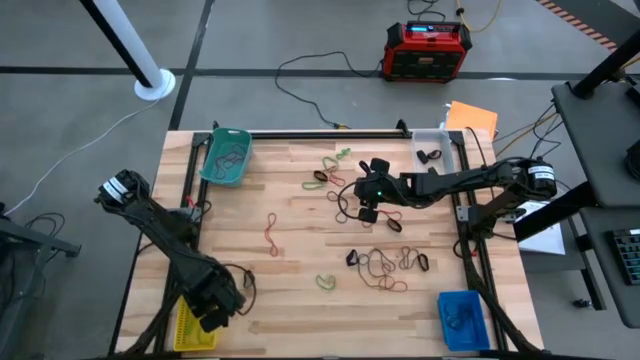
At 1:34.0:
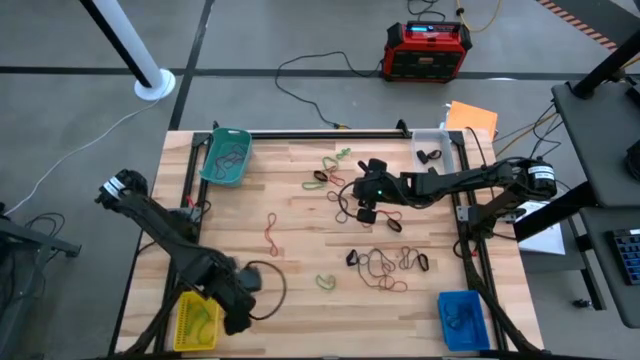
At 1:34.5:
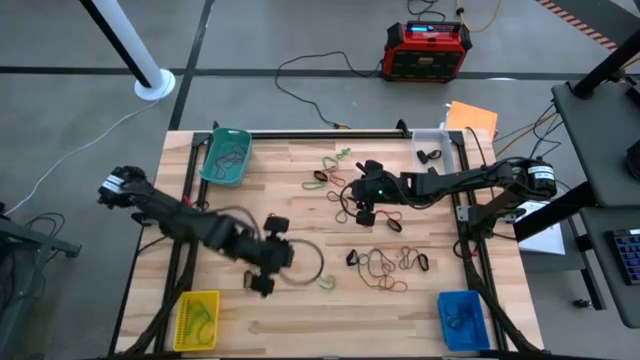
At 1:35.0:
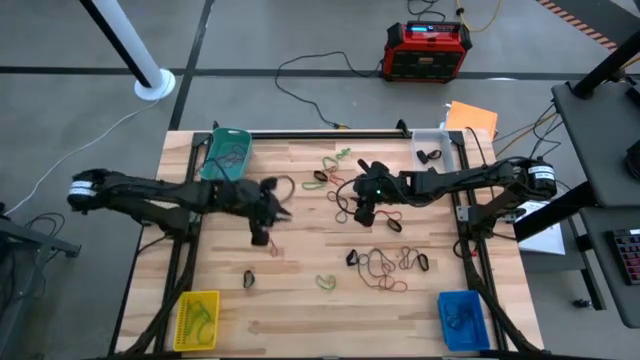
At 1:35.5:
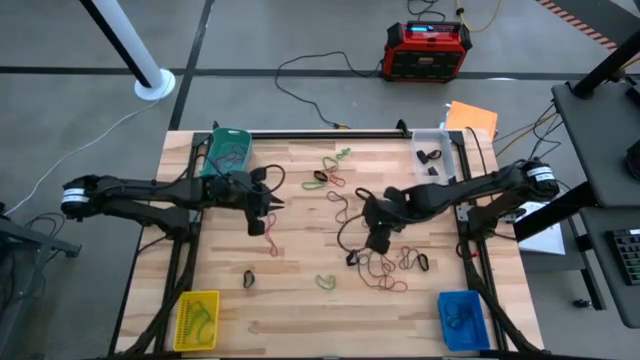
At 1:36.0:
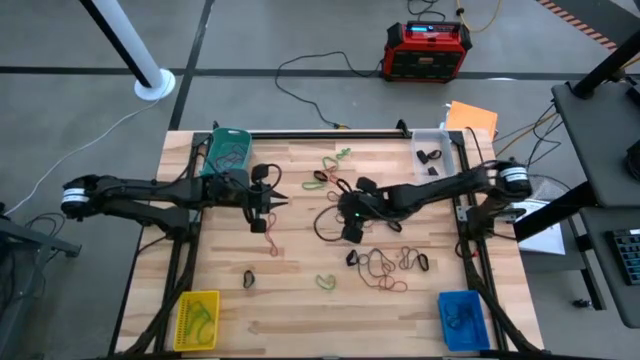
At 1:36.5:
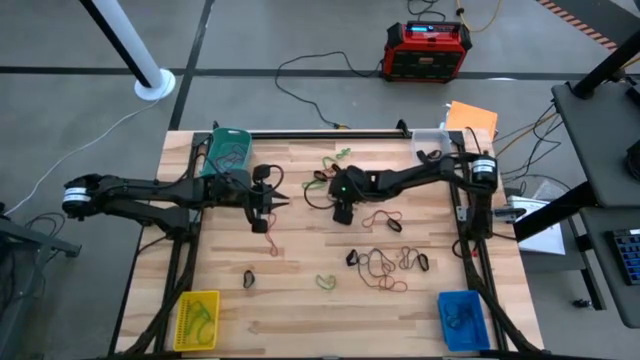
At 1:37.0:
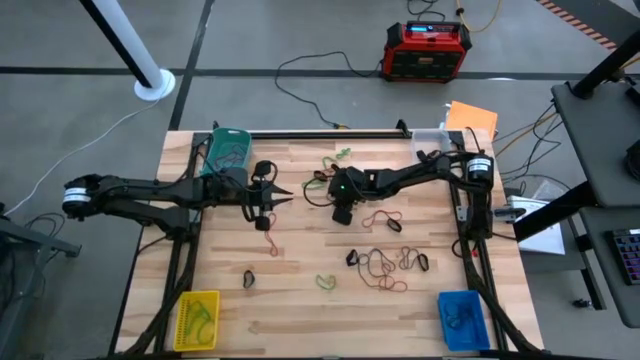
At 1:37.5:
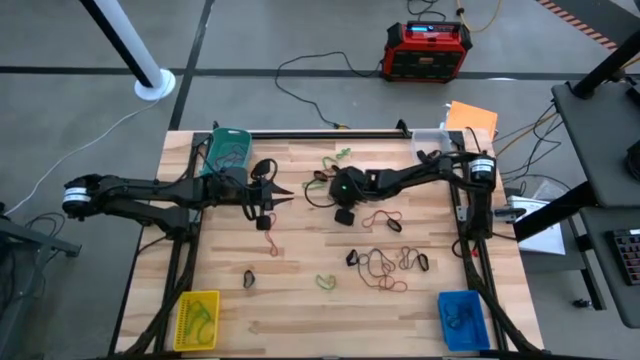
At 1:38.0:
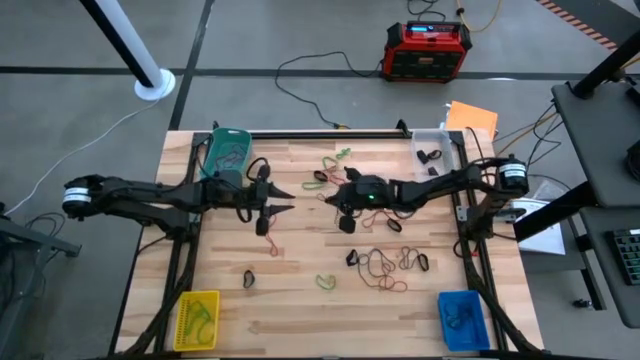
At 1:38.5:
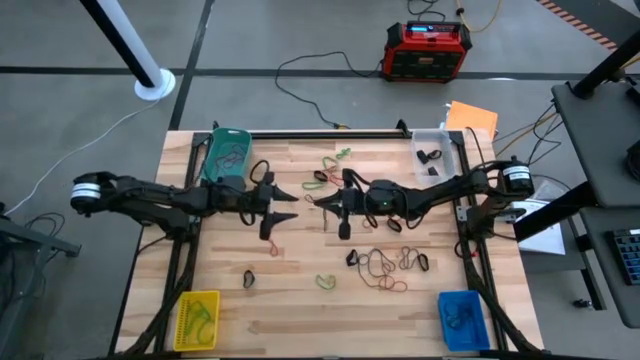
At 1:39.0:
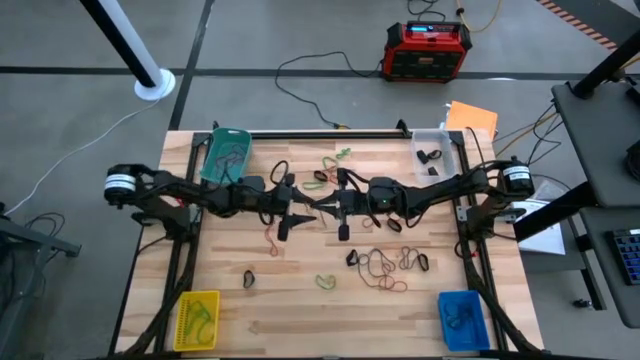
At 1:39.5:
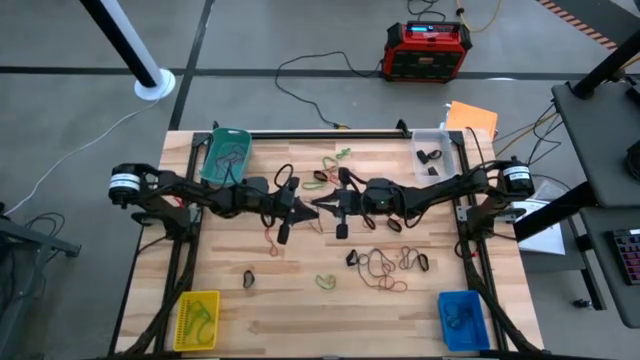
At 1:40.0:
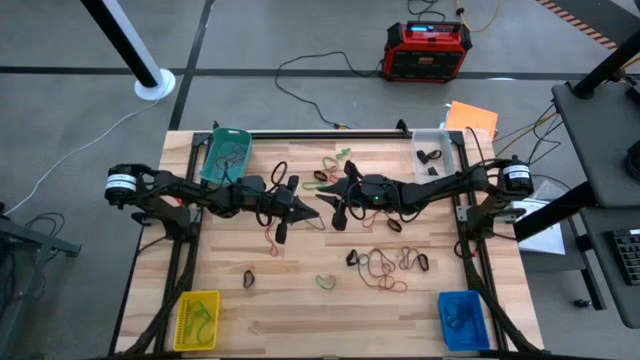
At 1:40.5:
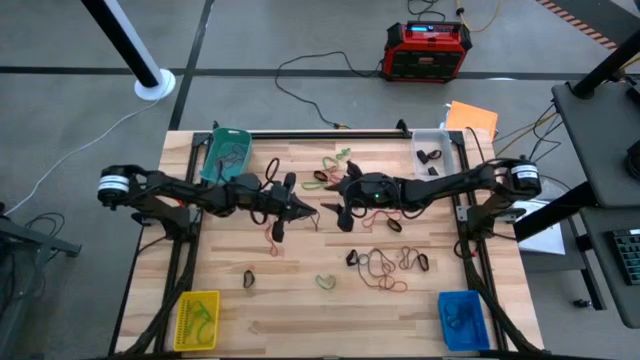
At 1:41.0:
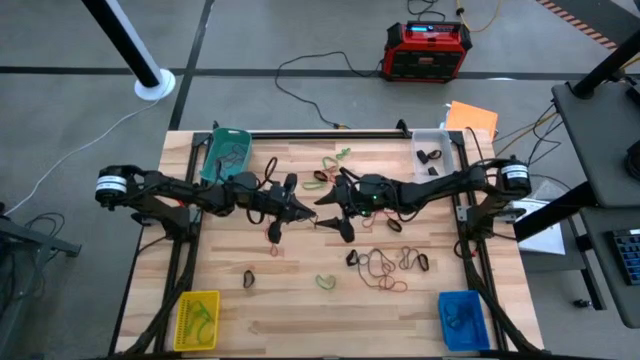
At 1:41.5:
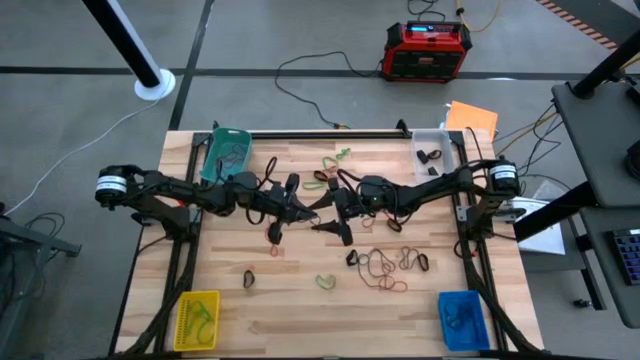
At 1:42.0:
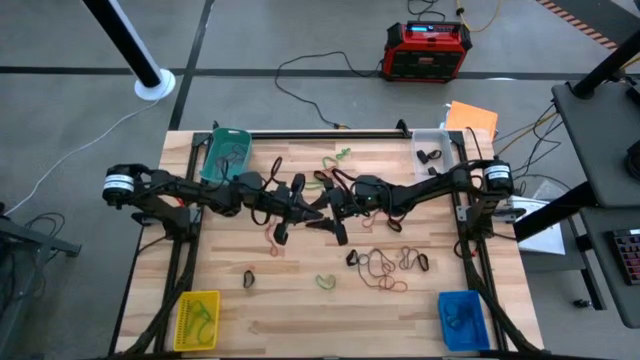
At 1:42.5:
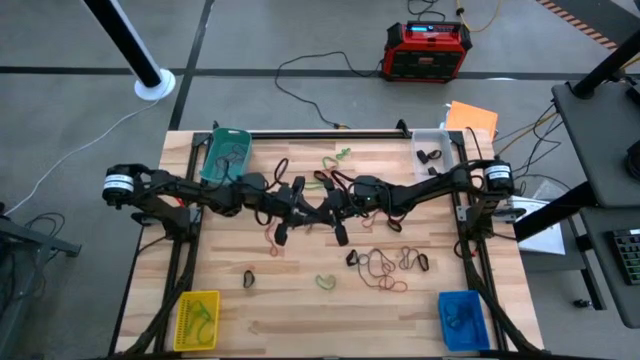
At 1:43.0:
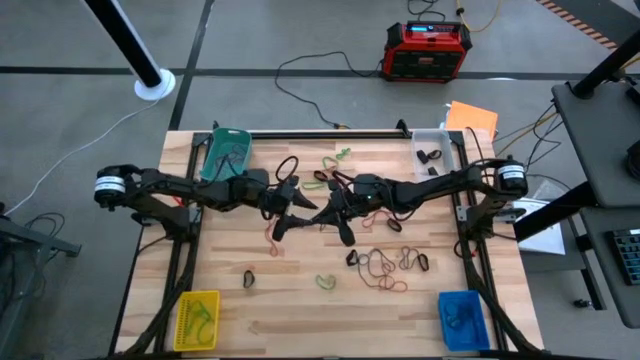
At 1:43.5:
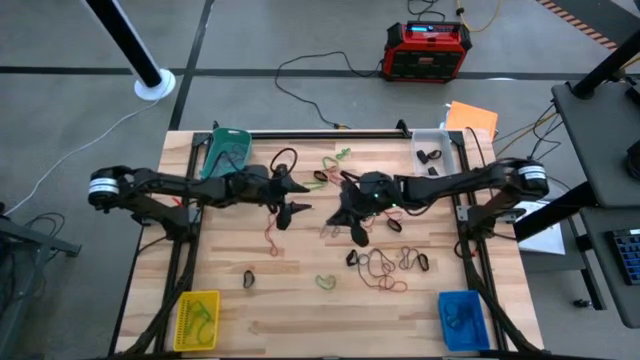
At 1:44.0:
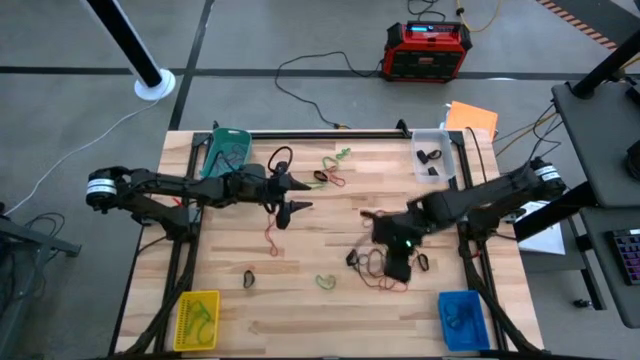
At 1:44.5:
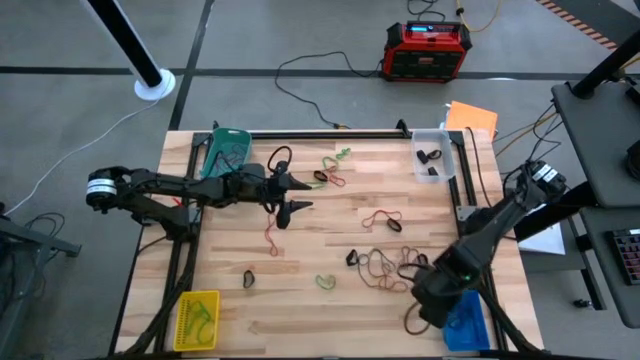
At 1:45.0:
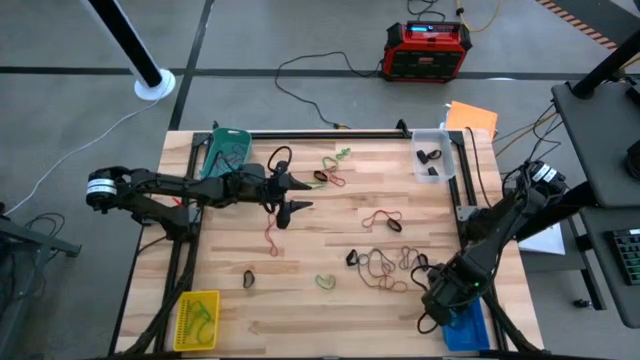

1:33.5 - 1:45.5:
Task: Sort rubber bands into baskets
Put the violet rubber band into the blue bin

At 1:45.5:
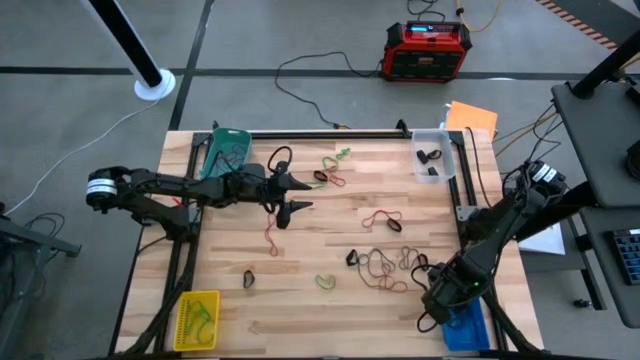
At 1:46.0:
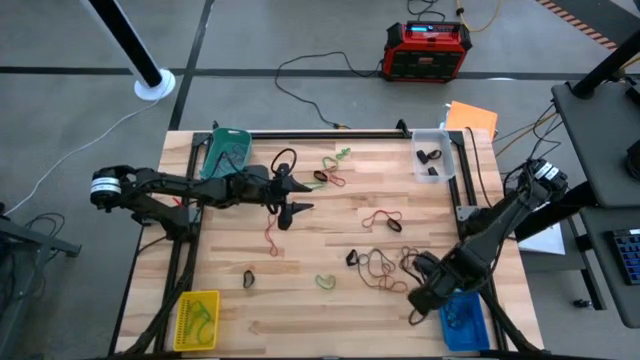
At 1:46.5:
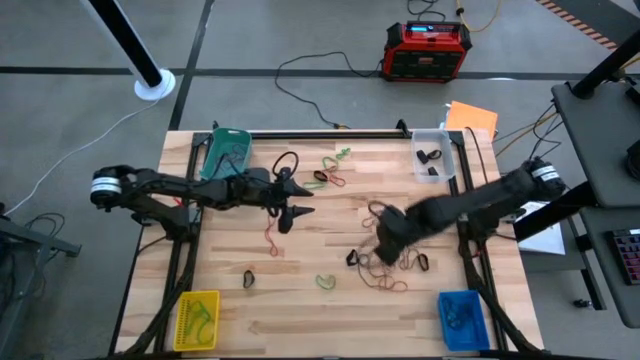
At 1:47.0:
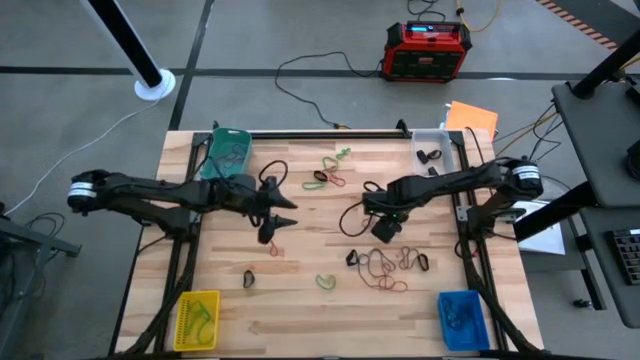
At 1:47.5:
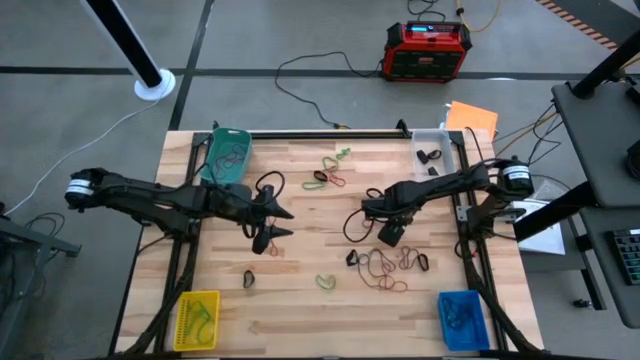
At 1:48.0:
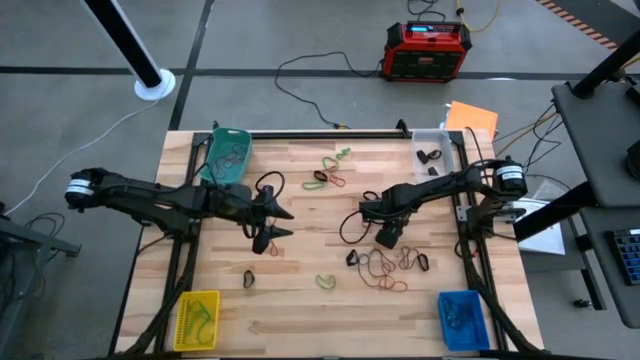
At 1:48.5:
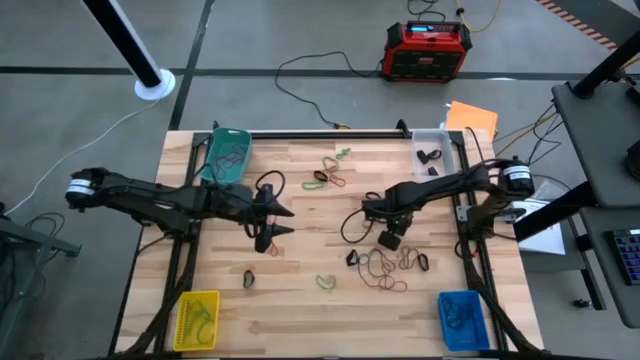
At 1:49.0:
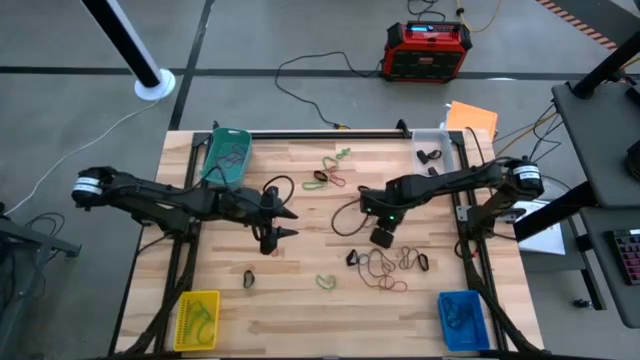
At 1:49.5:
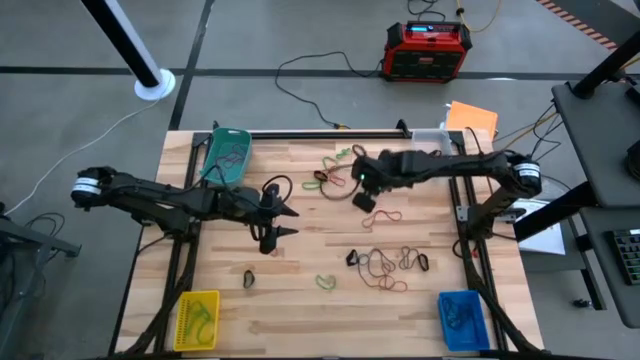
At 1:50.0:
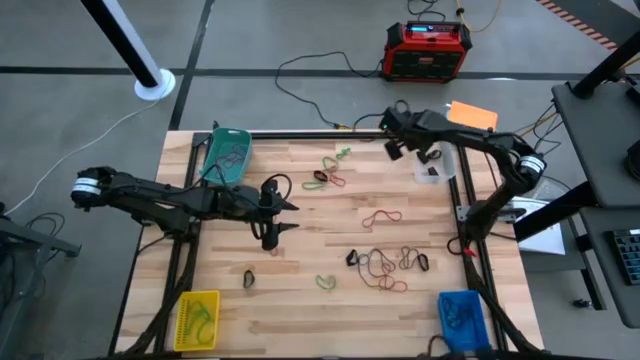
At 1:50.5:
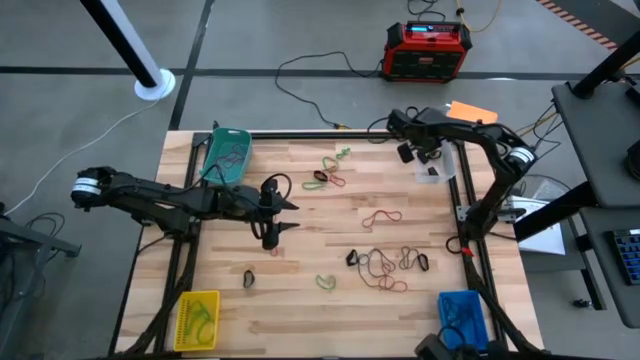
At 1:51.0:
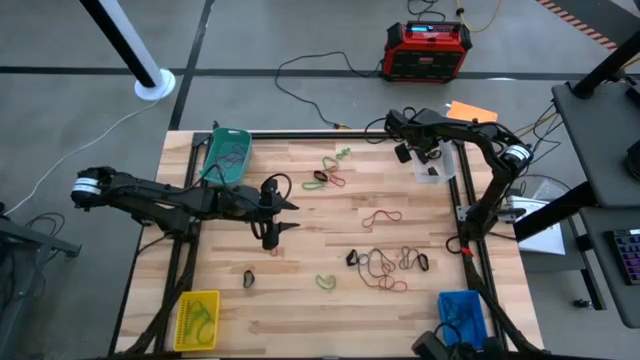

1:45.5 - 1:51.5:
Put the black rubber band into the transparent bin

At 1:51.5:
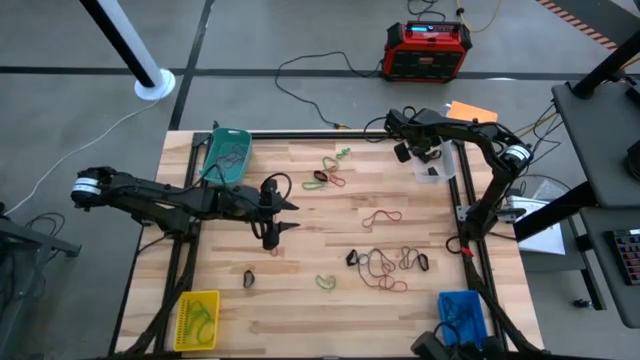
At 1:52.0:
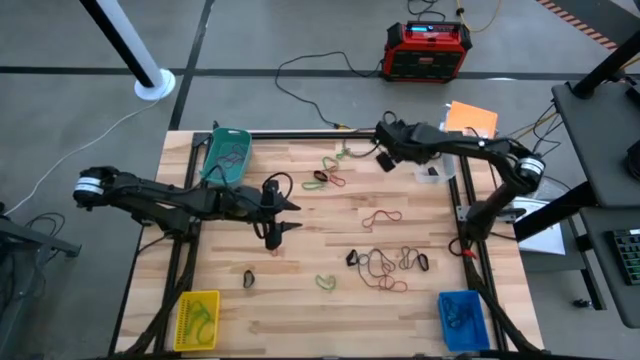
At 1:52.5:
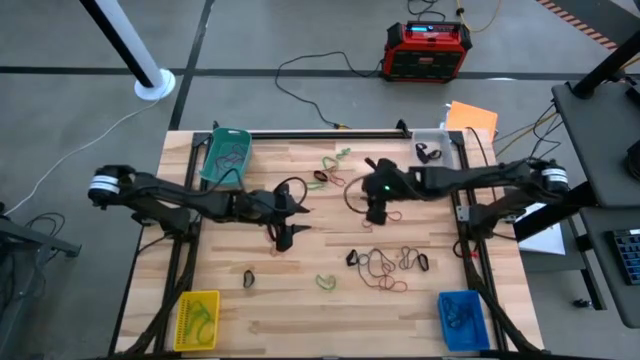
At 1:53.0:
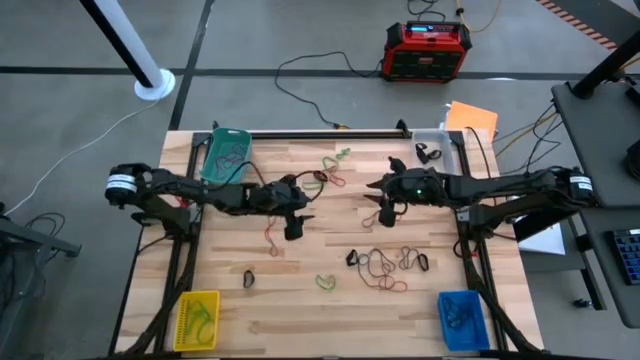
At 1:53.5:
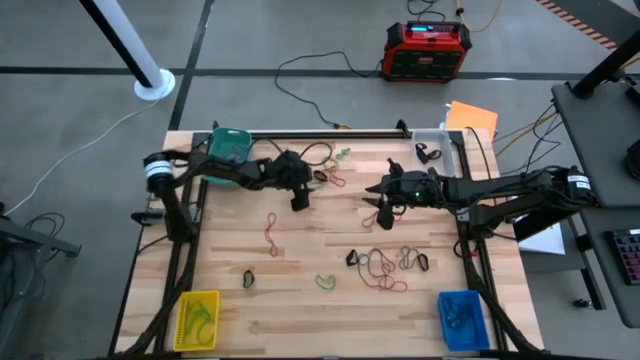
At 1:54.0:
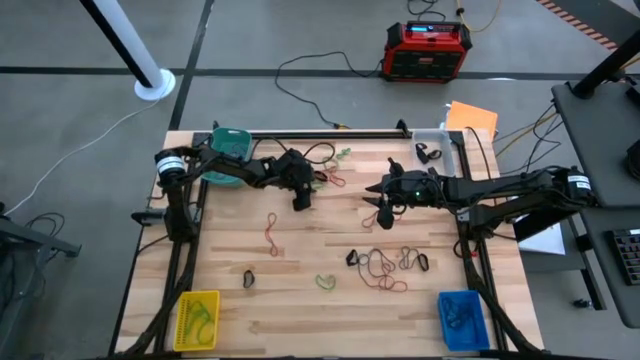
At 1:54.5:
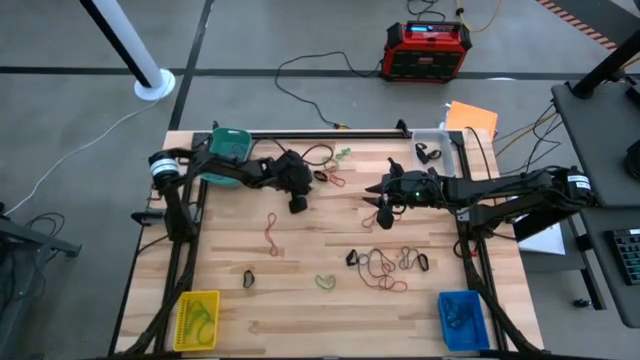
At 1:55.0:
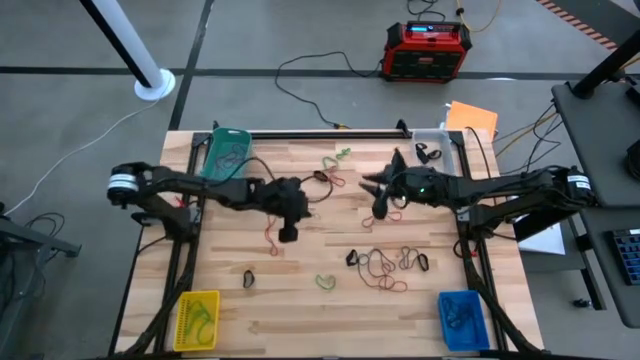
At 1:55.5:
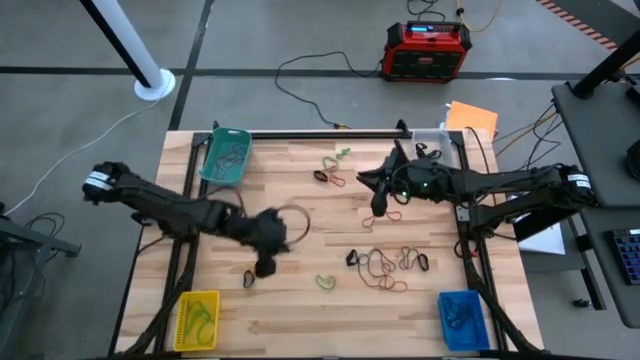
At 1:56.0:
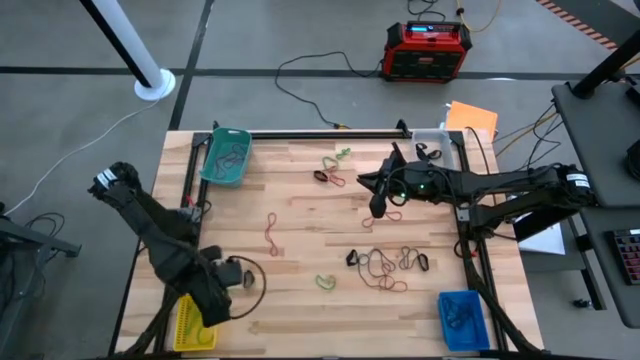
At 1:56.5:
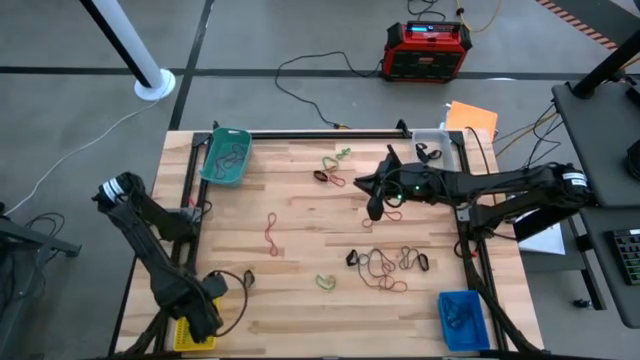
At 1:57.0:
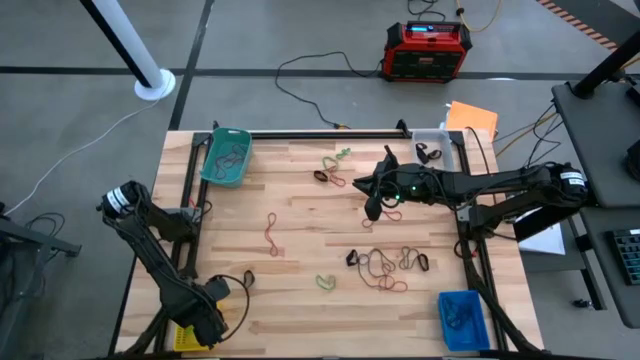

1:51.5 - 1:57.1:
Put the green rubber band into the yellow bin
